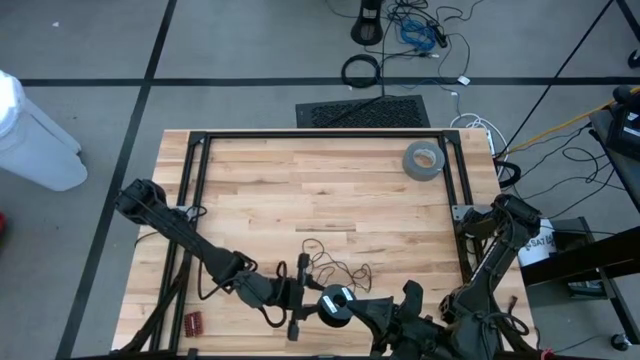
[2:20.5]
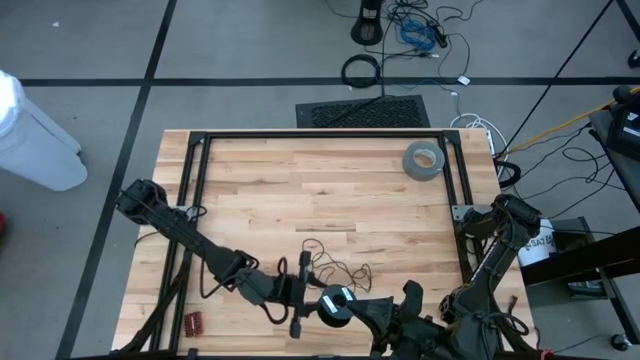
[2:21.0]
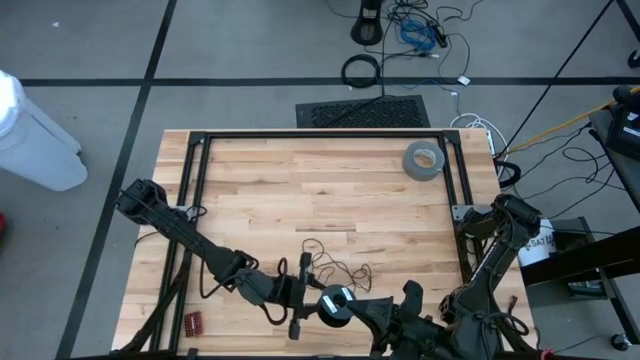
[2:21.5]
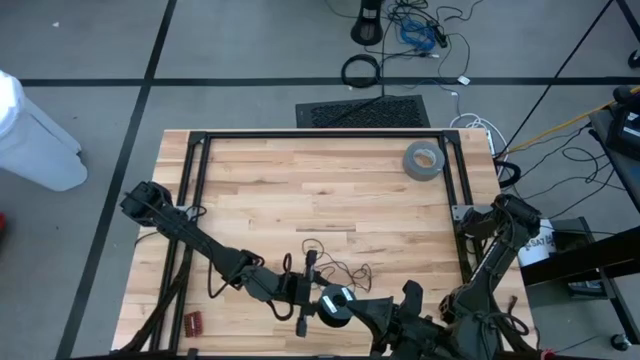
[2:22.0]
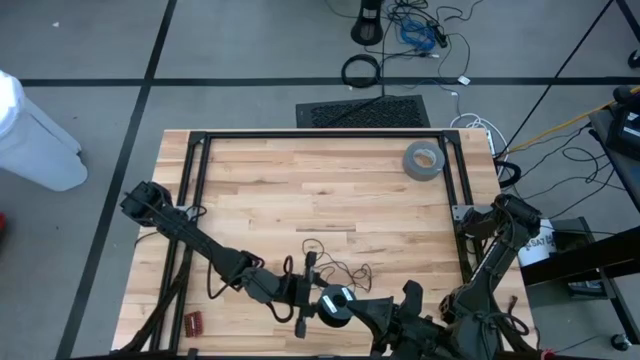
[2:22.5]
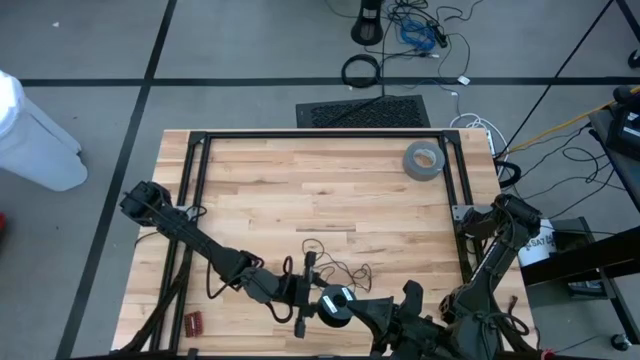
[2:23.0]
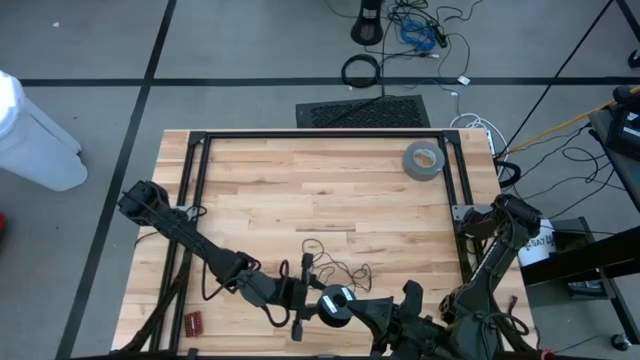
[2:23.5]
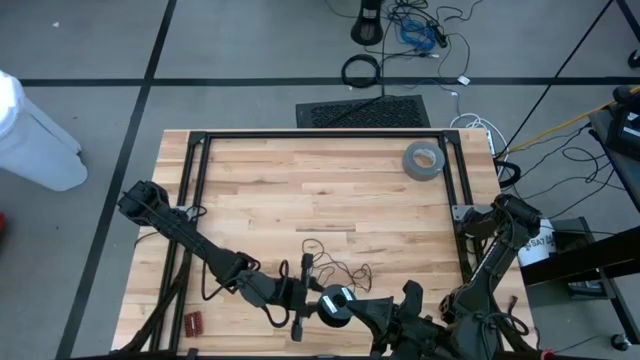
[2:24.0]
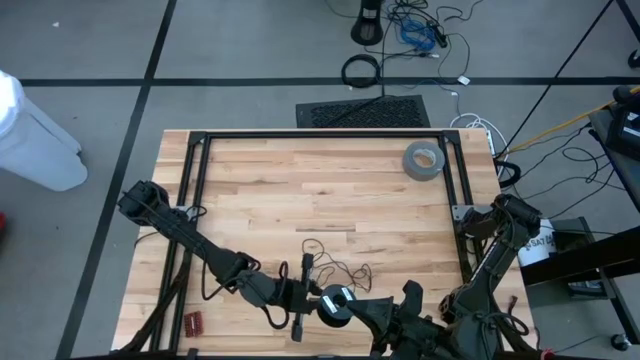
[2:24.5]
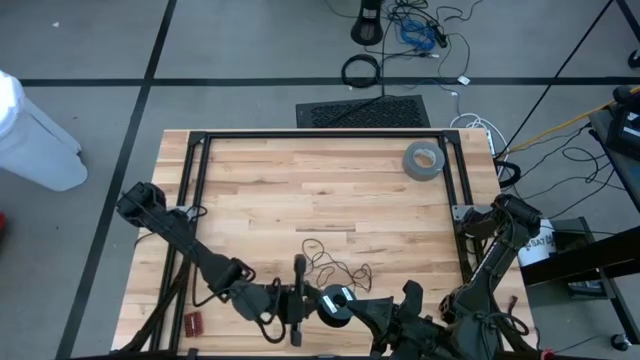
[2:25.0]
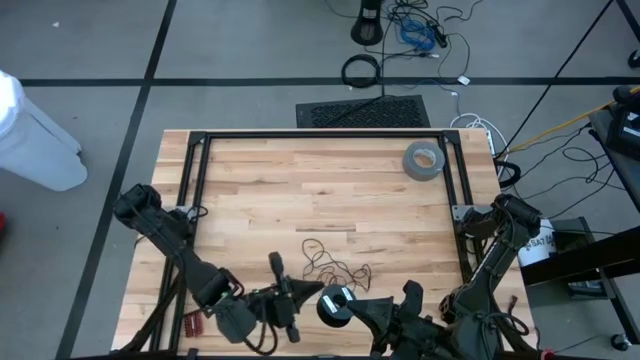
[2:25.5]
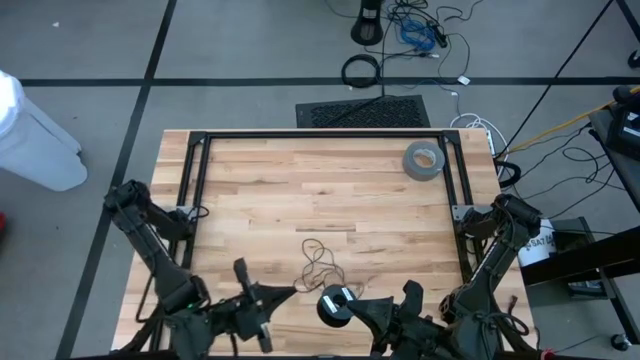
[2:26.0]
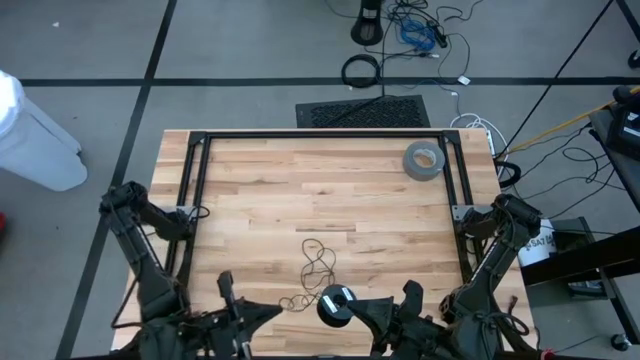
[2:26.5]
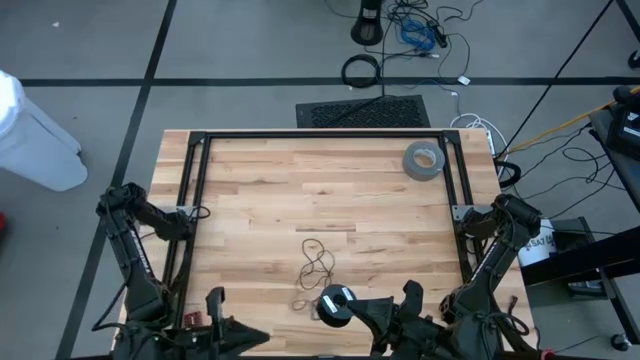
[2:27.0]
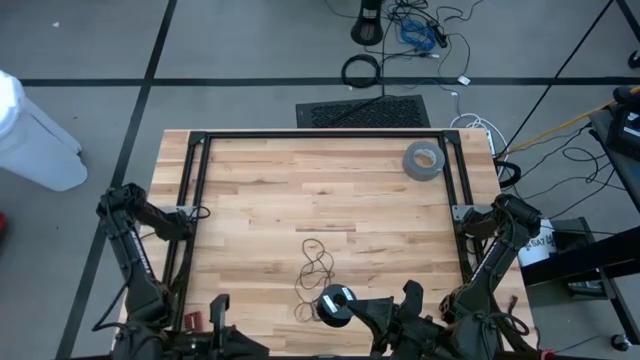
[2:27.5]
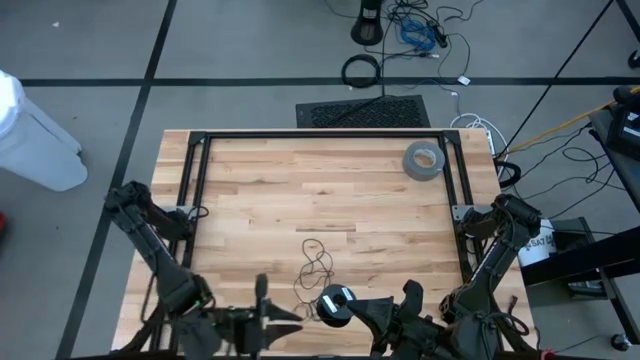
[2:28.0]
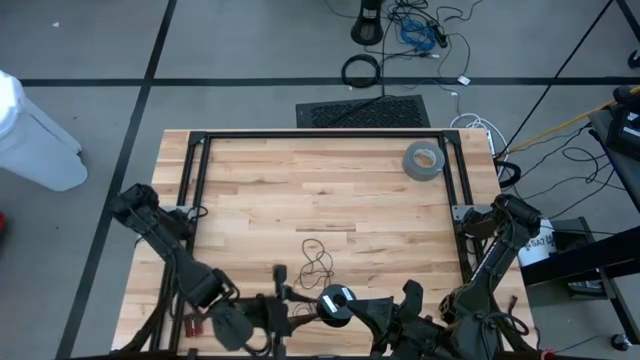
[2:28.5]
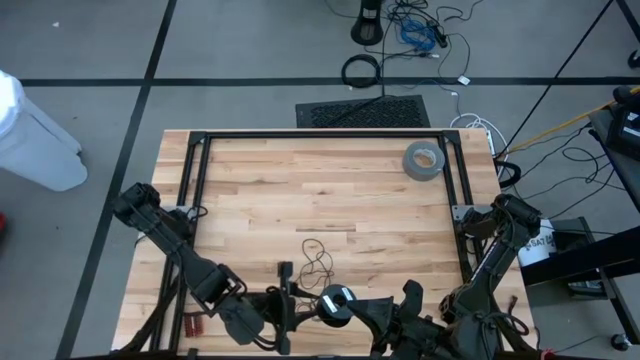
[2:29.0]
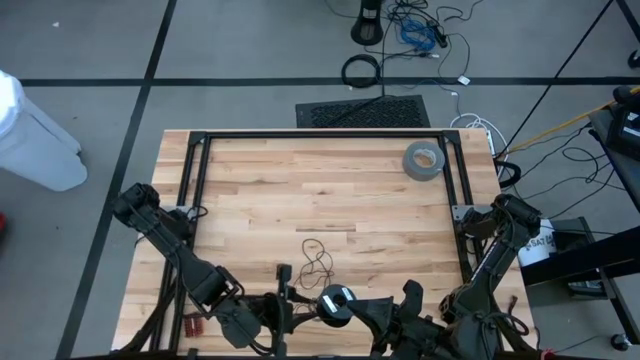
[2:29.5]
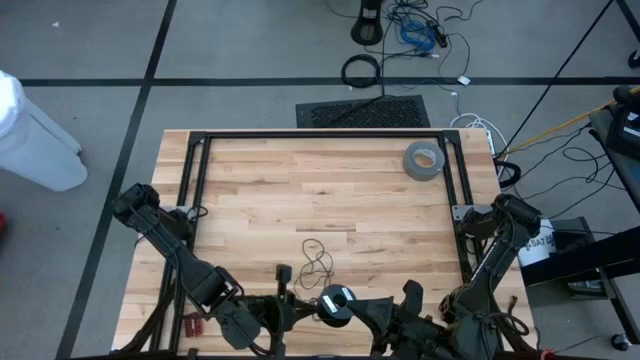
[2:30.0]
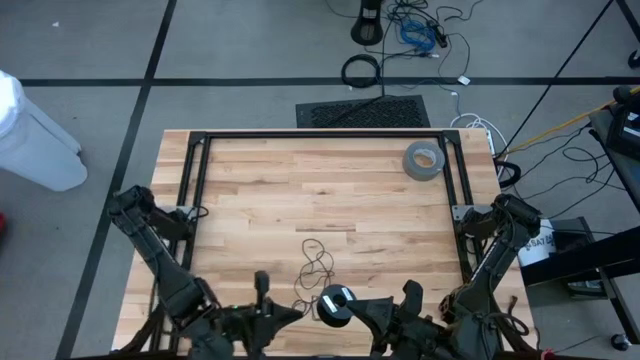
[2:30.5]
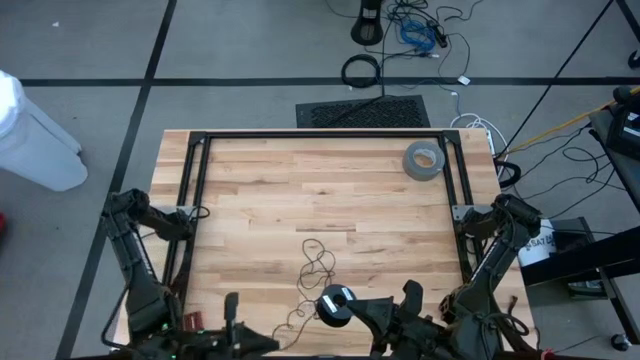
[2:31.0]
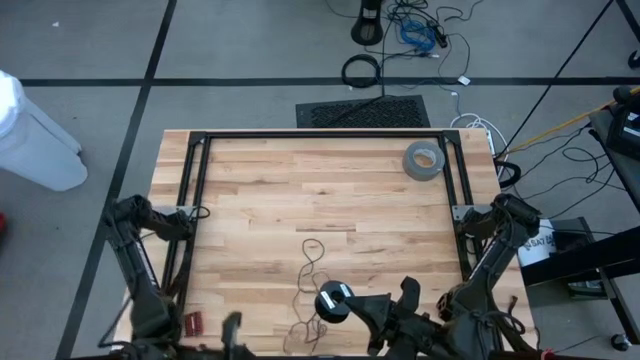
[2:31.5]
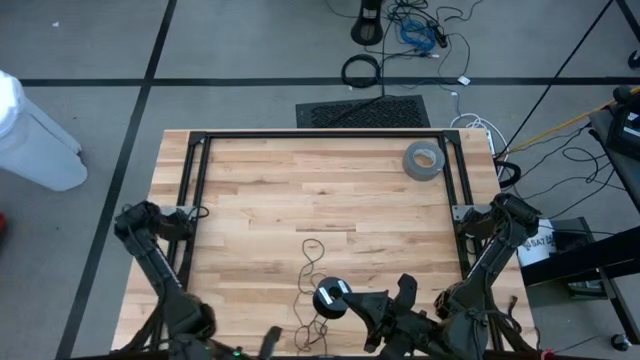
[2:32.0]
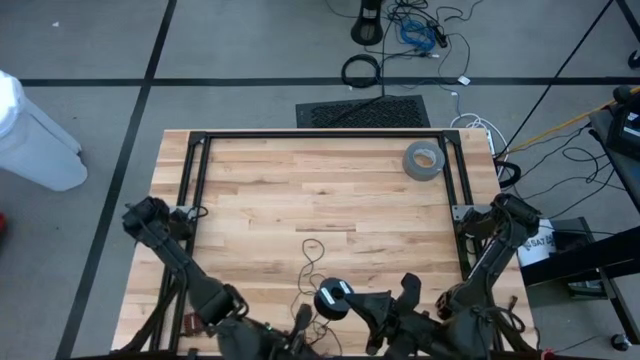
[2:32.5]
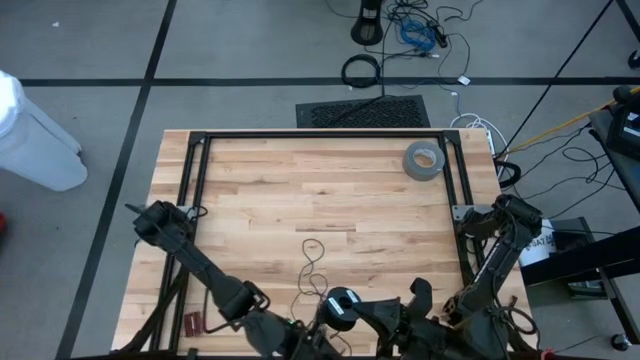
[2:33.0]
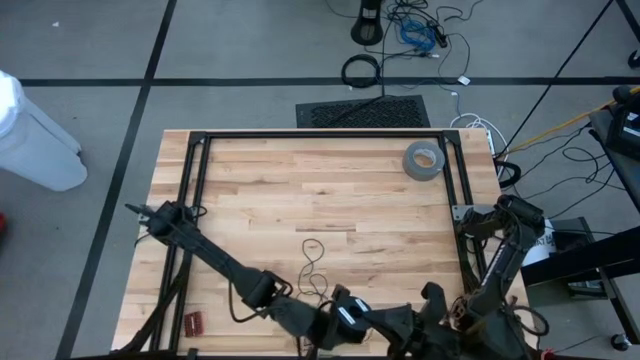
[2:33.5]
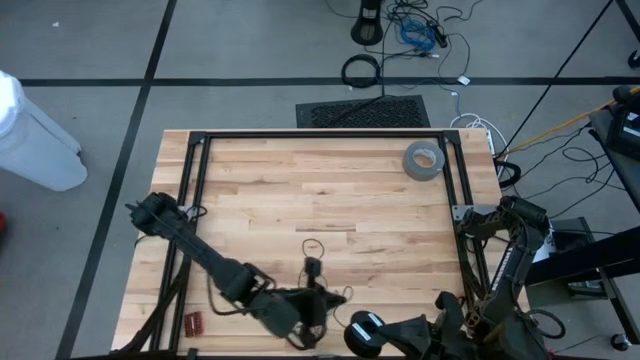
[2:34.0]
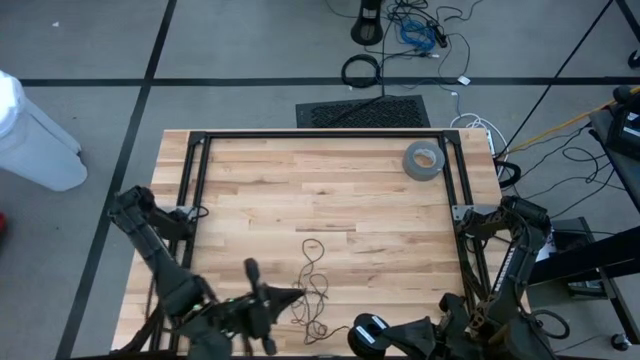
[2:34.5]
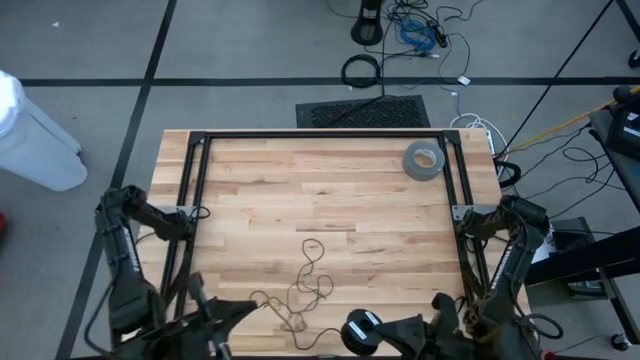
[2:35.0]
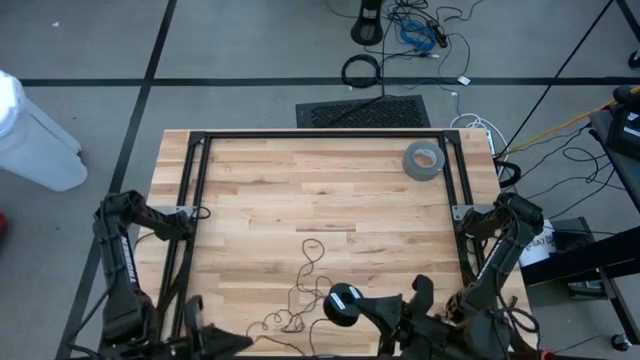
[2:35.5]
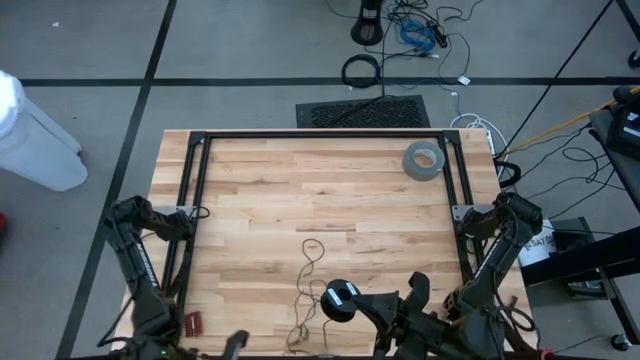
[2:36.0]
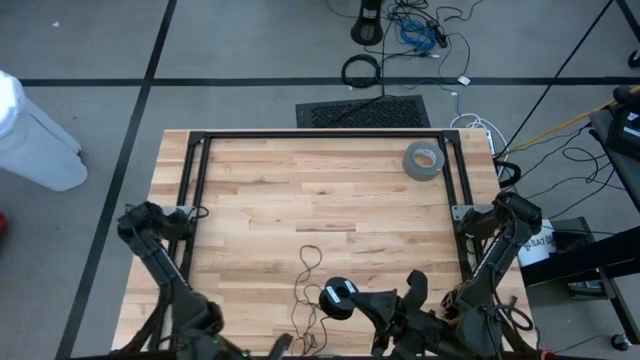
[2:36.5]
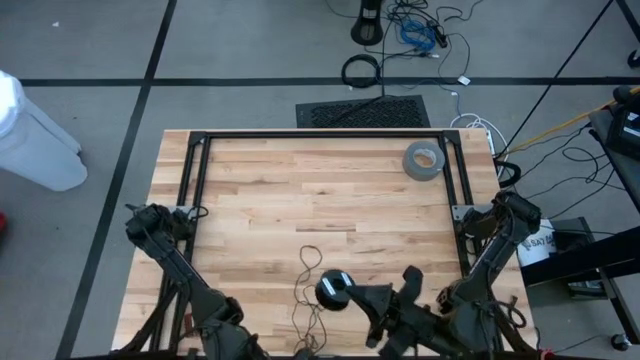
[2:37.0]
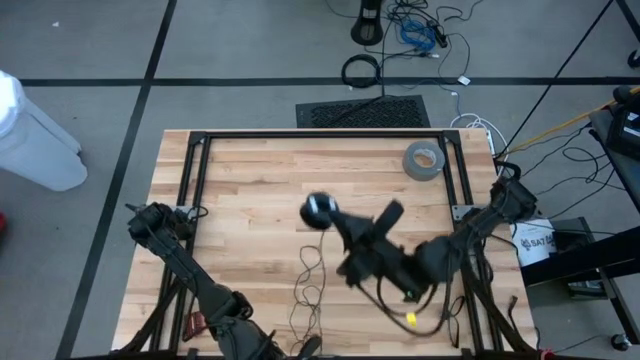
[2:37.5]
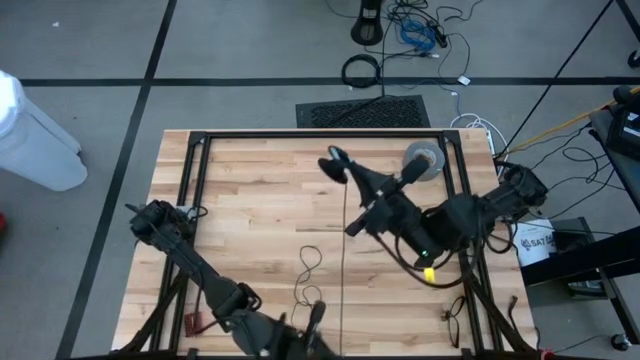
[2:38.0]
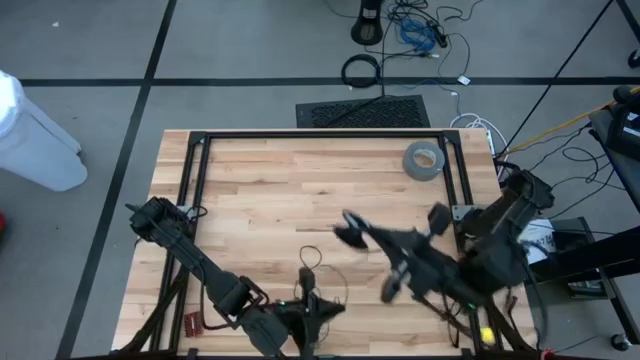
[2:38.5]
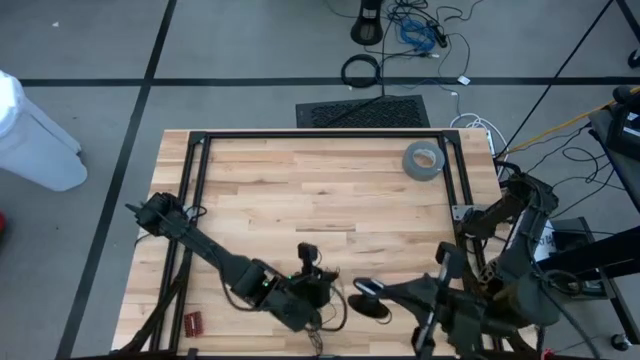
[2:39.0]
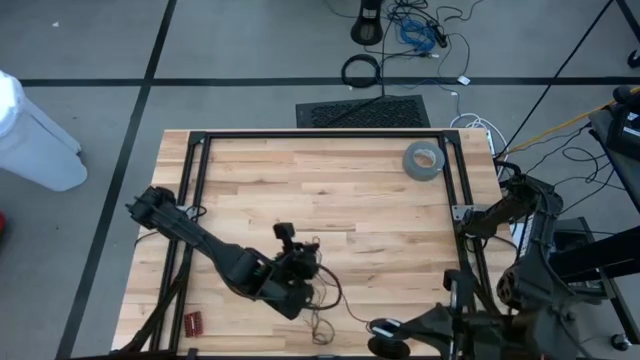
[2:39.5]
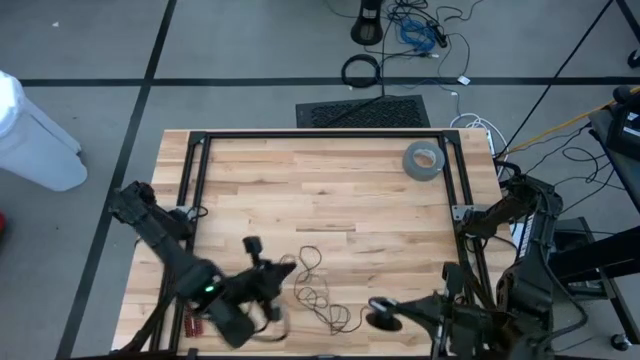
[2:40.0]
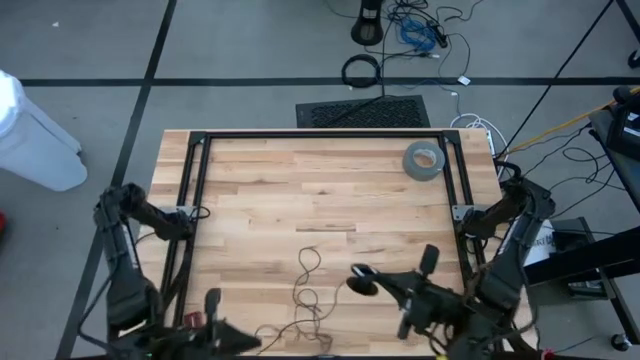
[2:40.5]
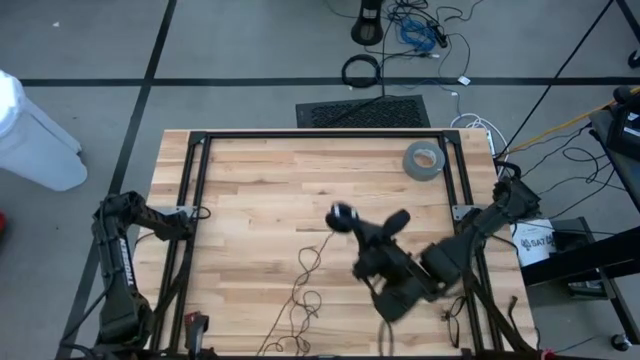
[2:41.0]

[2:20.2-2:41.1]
Task: Coil cords
Uncoil the black wire from the spool
